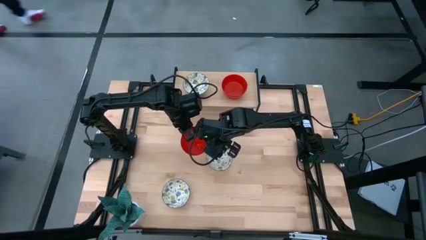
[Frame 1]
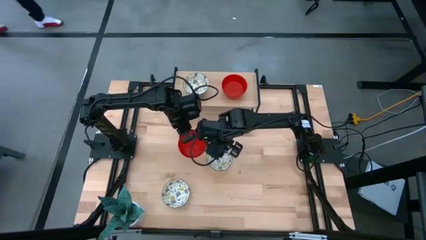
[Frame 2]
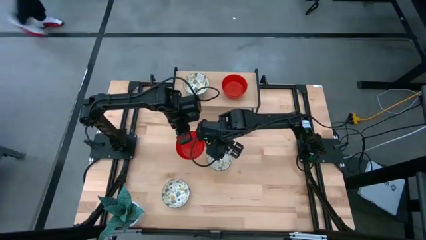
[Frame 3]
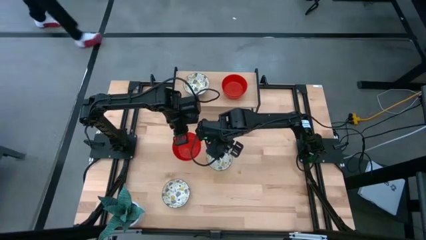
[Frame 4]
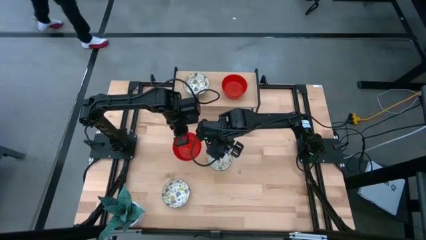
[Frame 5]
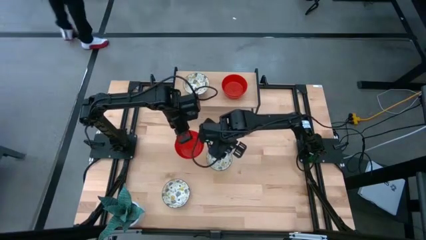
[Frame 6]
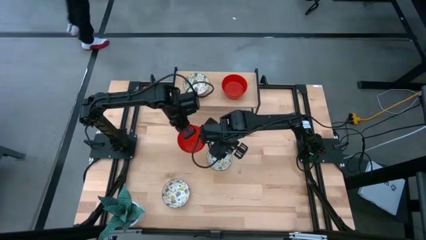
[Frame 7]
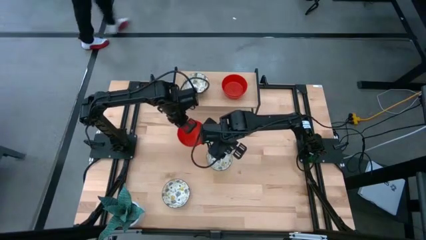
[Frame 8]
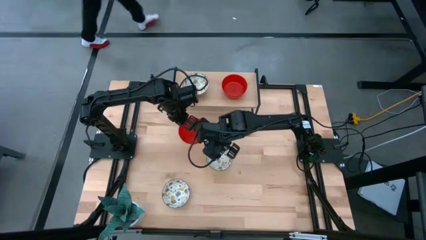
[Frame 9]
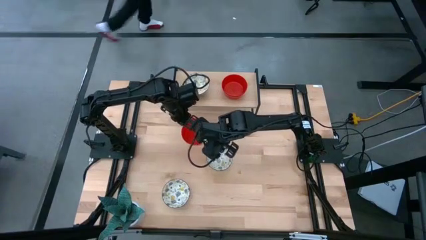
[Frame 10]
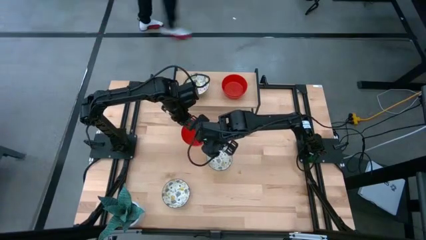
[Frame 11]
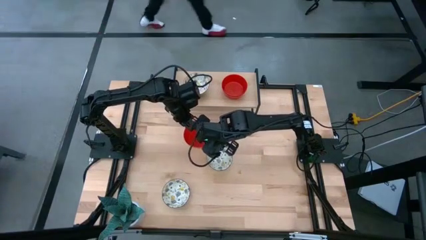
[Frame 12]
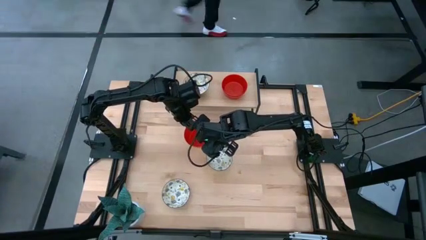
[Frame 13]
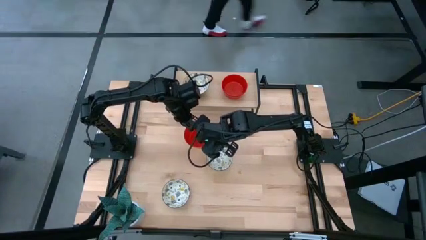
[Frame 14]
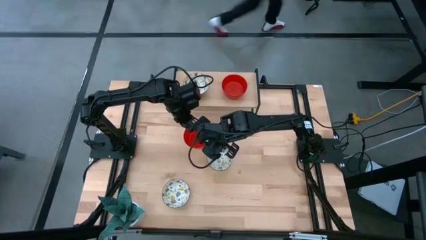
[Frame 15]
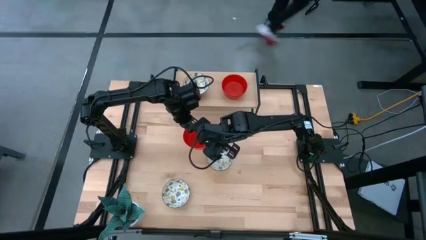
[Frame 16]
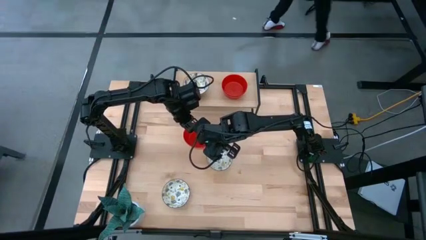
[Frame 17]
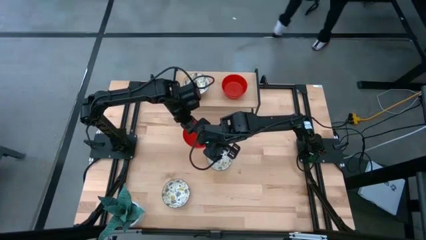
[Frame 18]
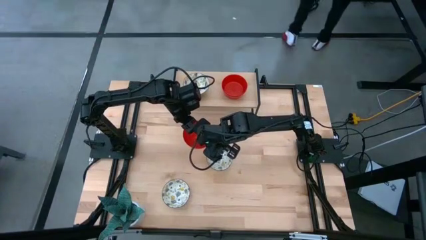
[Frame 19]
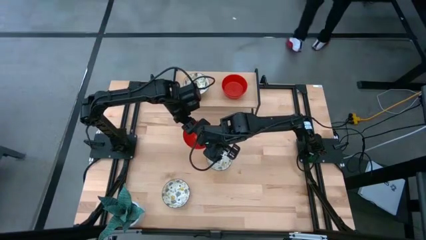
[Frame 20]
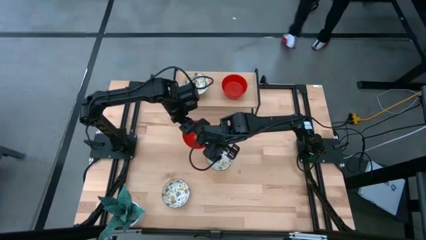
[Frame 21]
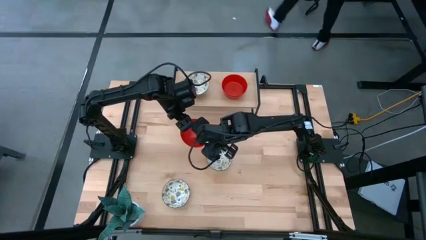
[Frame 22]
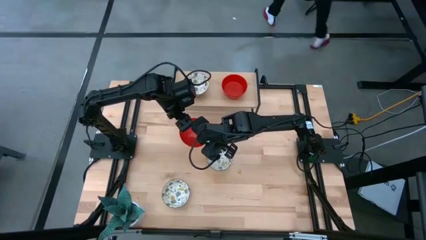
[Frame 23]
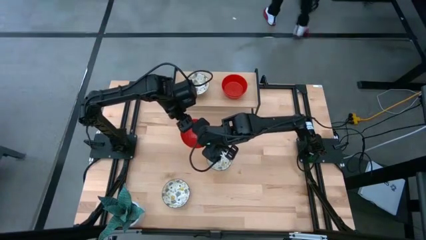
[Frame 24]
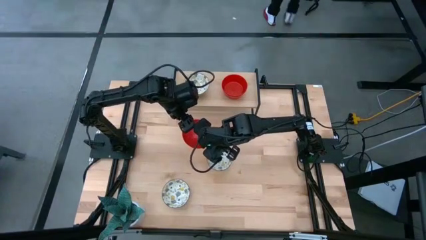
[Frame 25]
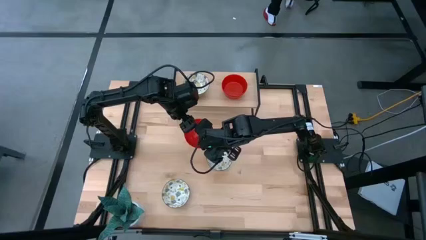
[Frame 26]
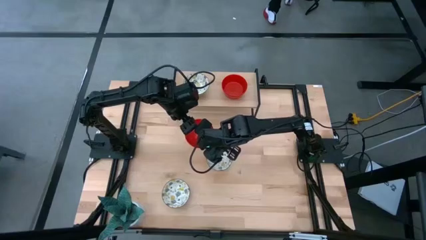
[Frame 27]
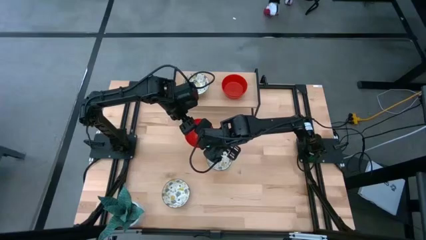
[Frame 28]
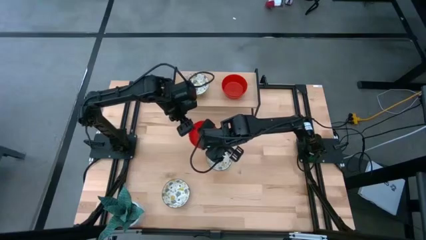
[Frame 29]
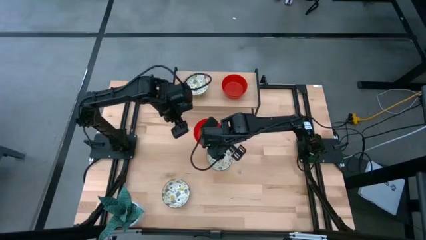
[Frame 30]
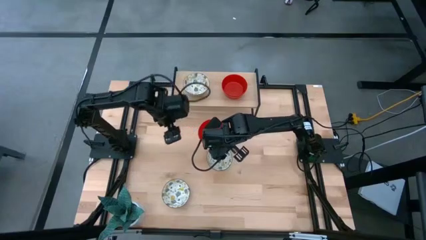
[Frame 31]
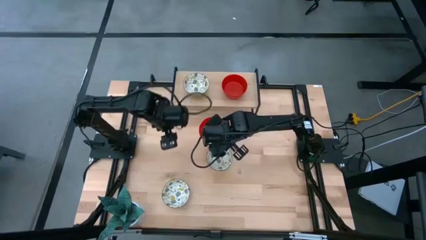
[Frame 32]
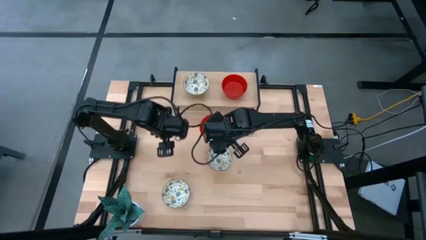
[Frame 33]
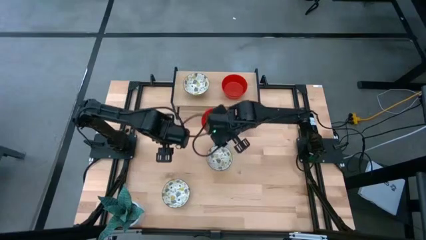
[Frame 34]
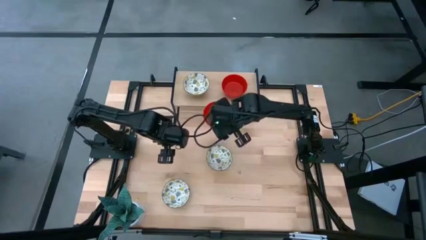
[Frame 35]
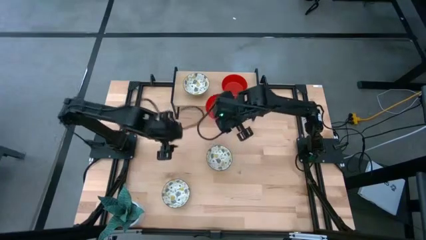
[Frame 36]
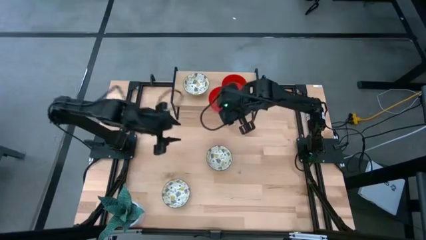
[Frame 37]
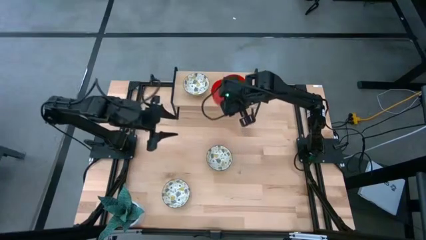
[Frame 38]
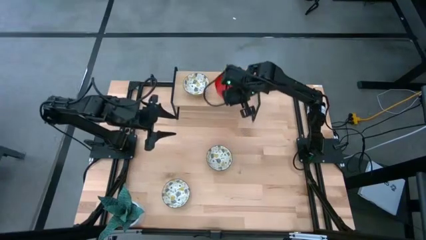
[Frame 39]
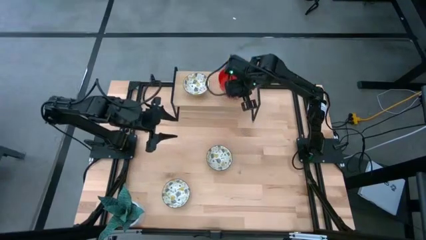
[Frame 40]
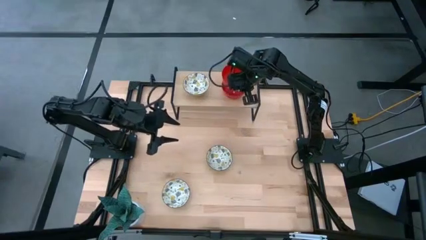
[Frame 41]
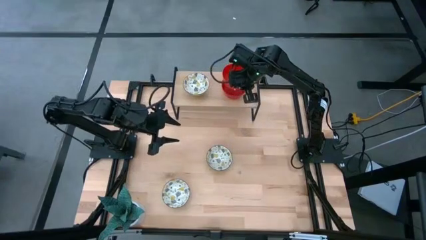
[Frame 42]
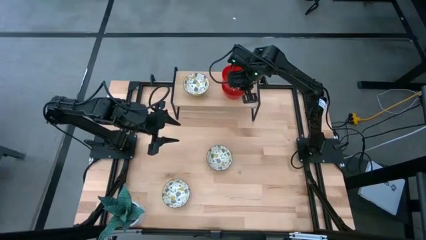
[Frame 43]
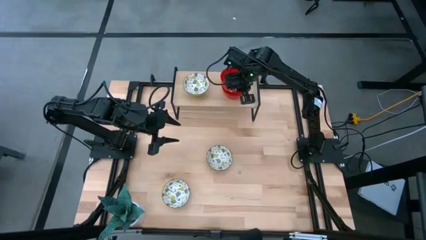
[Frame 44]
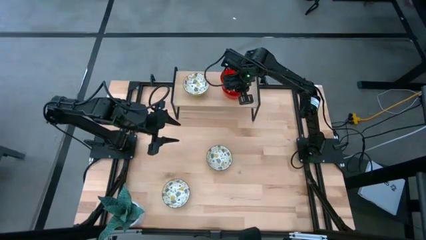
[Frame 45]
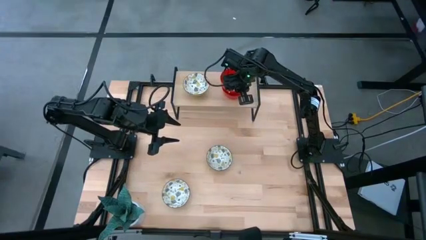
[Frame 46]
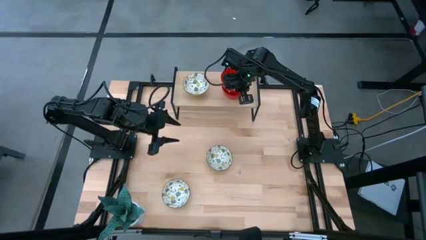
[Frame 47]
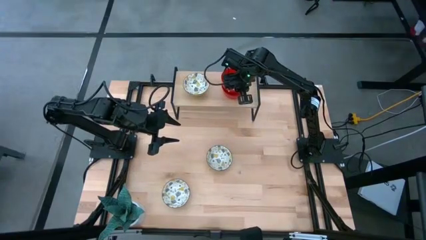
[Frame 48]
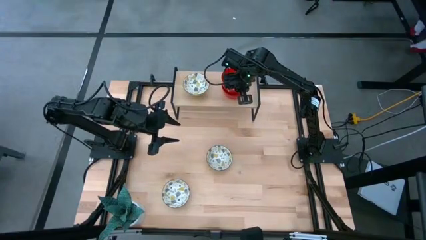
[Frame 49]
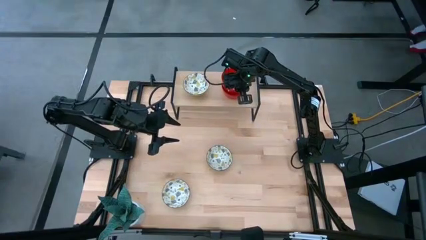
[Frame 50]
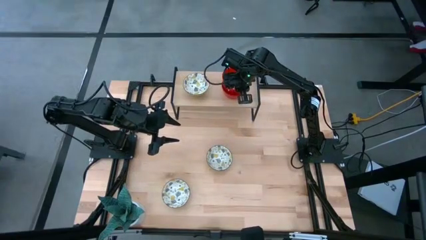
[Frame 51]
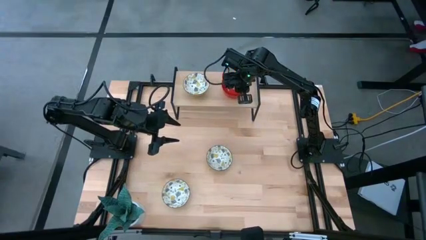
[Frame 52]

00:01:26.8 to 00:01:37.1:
Task: Pick & Place Mini bowls
Stack the red bowl on top of the red bowl on the shelf
